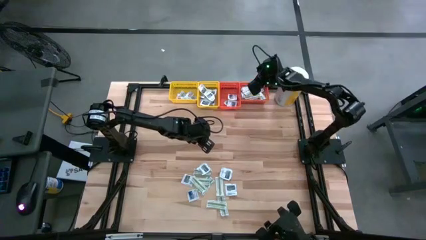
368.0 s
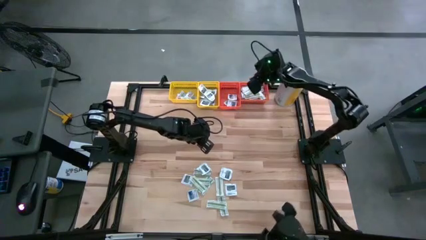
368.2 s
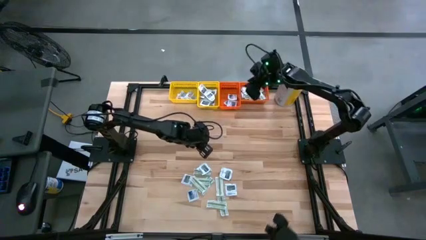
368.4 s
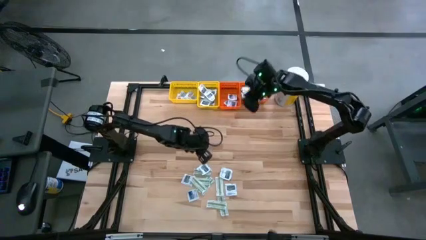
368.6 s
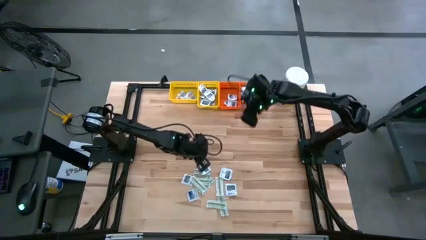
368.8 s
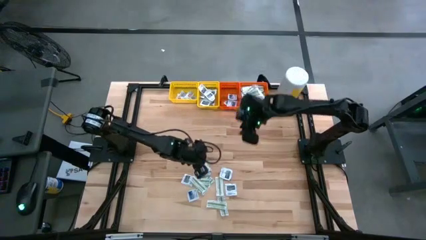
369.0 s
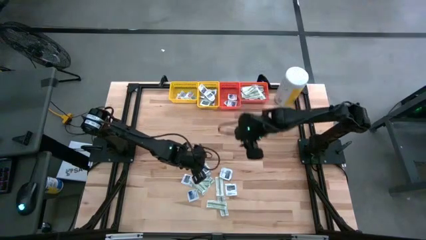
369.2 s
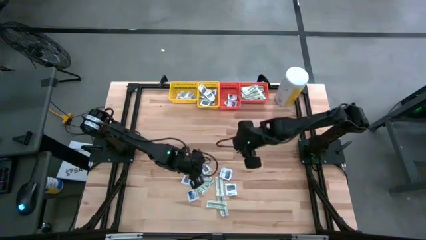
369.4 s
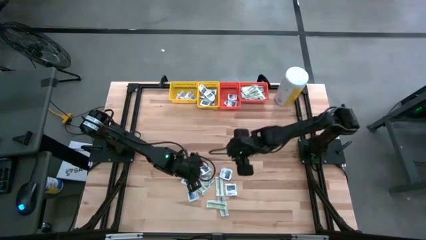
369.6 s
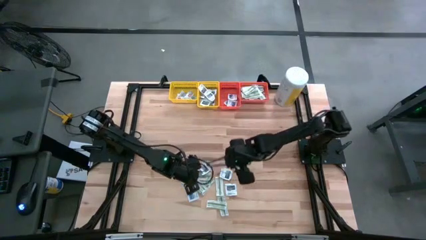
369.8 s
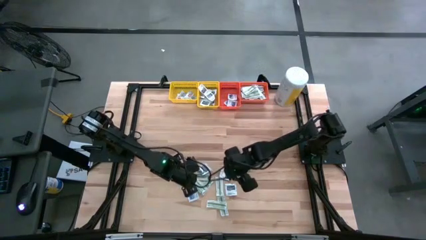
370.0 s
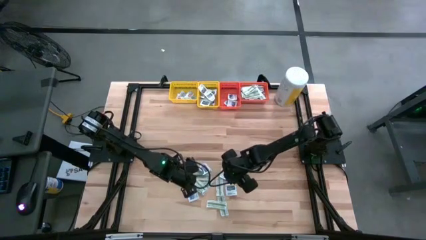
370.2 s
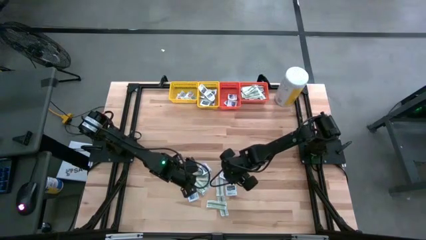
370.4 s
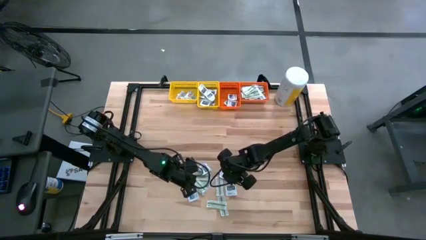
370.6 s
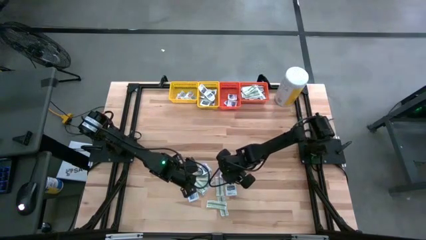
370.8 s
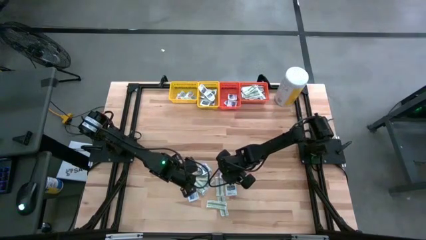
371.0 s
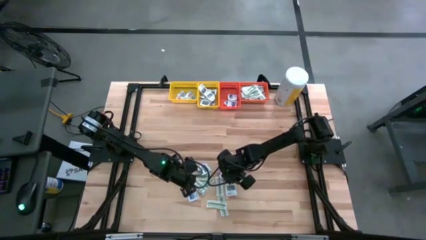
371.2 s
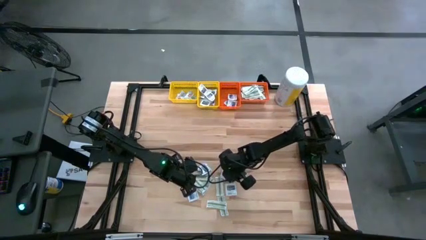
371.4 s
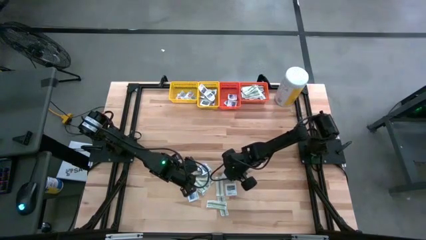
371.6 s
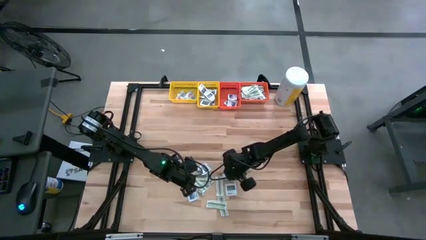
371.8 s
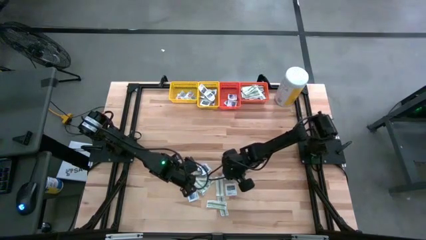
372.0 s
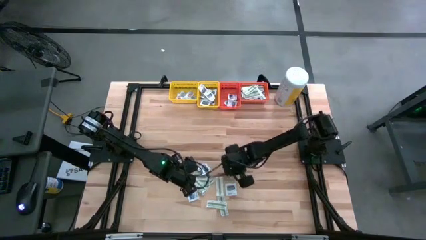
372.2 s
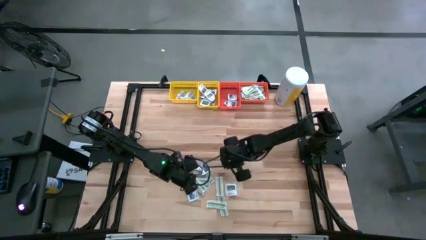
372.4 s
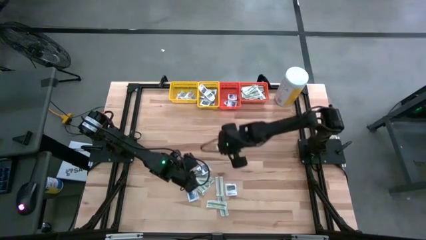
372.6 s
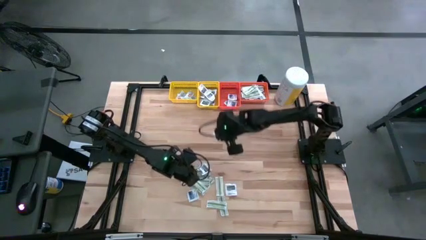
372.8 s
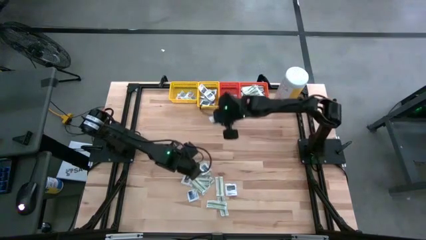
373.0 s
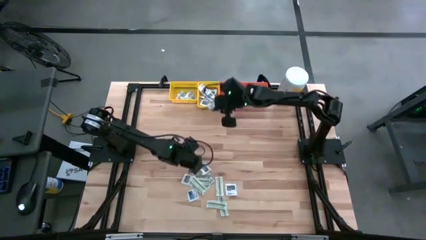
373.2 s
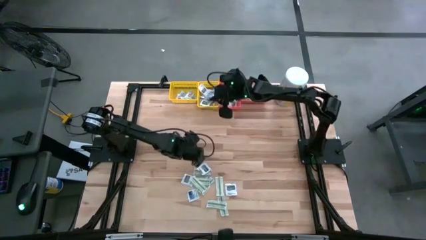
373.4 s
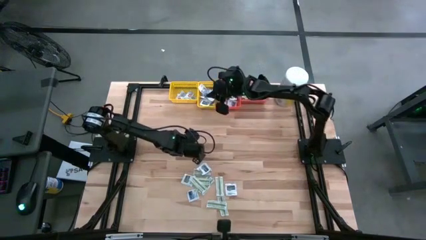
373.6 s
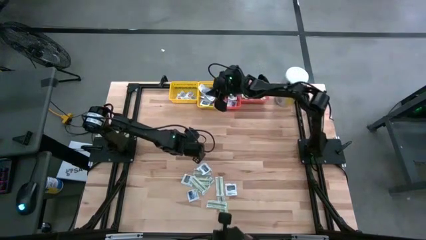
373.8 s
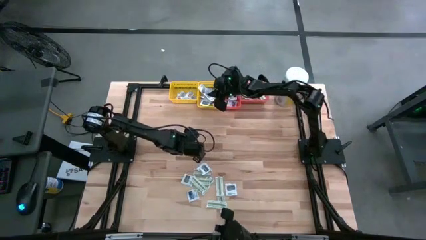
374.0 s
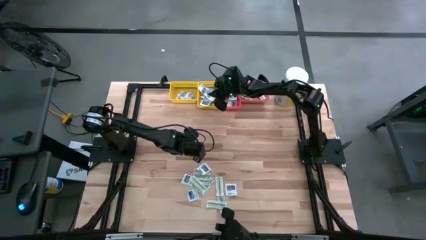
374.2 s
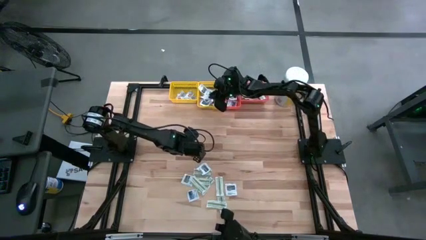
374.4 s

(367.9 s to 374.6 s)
Task: Pick & Place First Aid Supplies
Put the gray packet into the right yellow bin

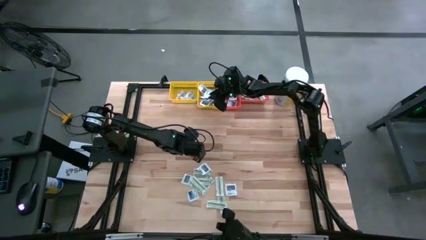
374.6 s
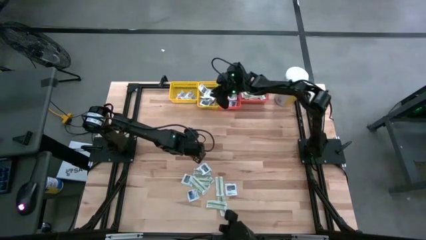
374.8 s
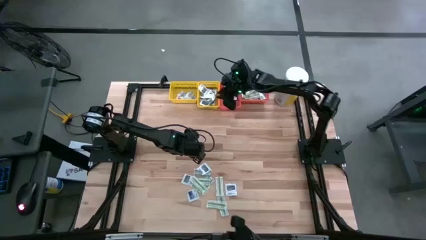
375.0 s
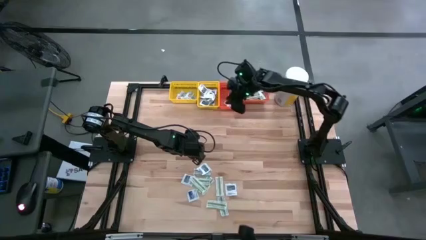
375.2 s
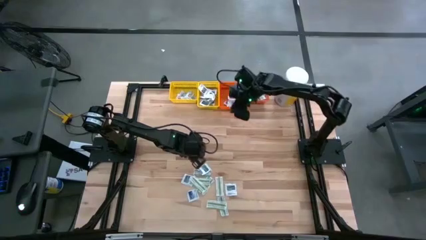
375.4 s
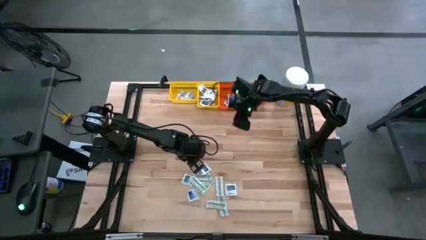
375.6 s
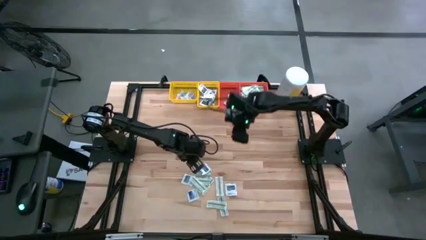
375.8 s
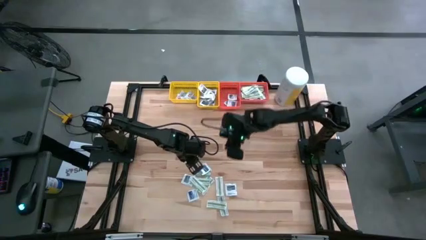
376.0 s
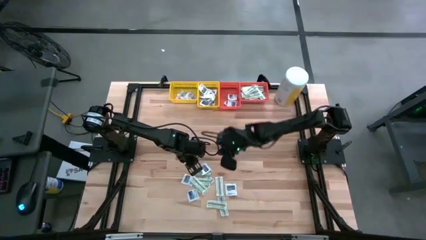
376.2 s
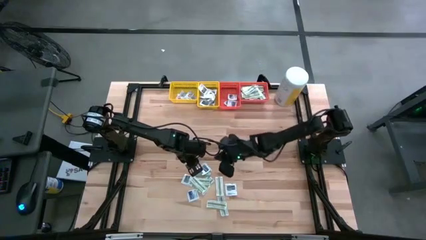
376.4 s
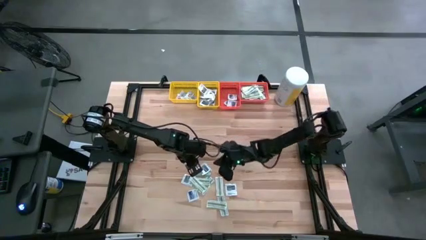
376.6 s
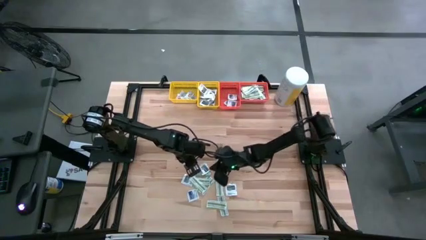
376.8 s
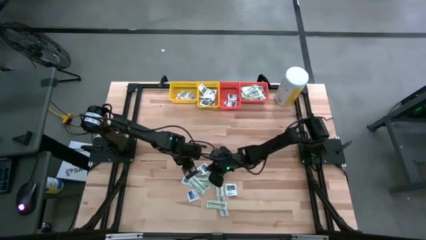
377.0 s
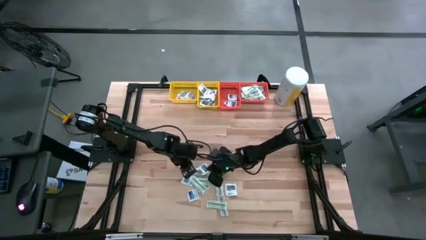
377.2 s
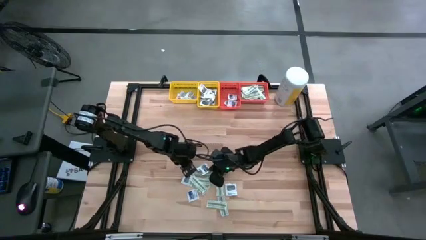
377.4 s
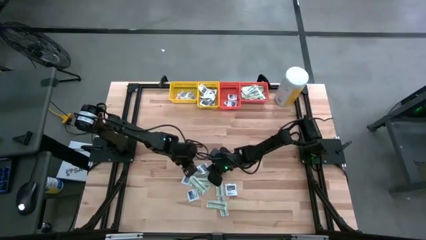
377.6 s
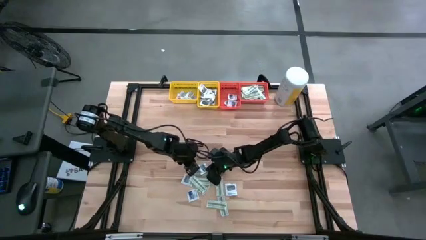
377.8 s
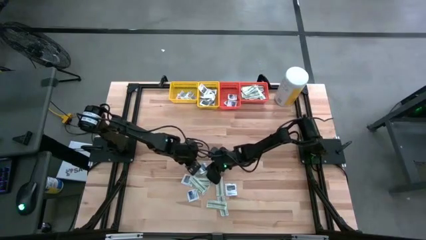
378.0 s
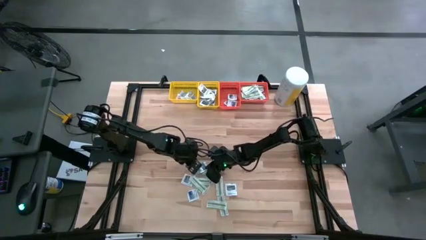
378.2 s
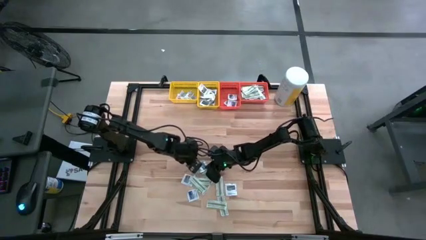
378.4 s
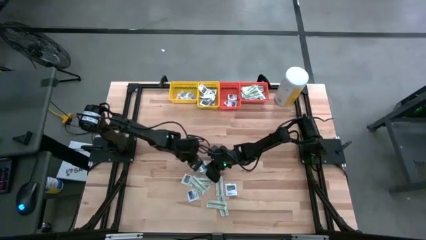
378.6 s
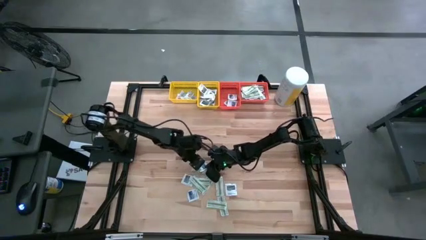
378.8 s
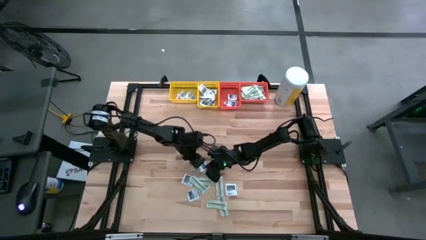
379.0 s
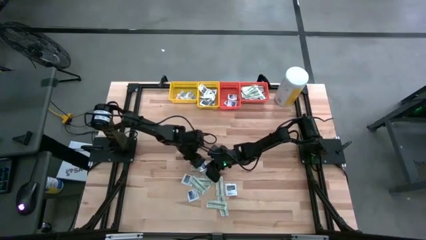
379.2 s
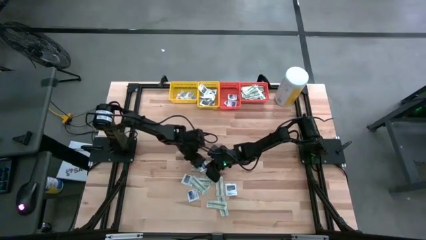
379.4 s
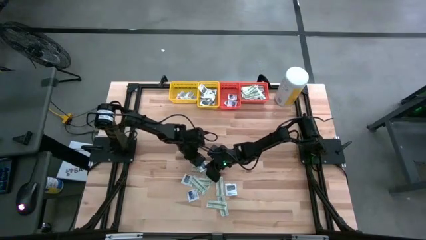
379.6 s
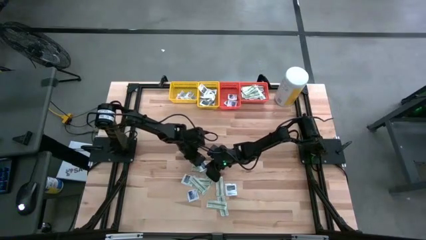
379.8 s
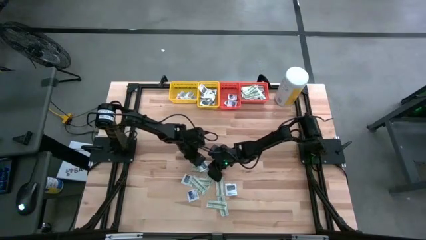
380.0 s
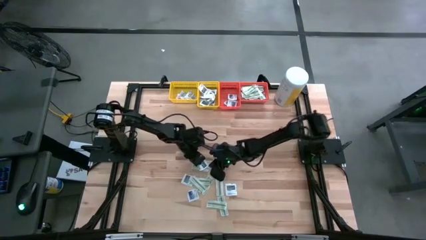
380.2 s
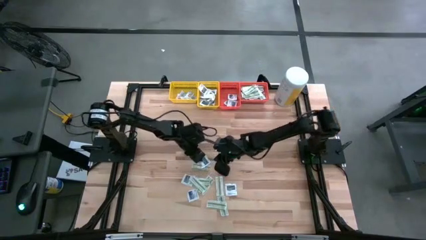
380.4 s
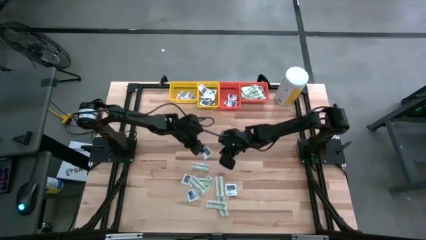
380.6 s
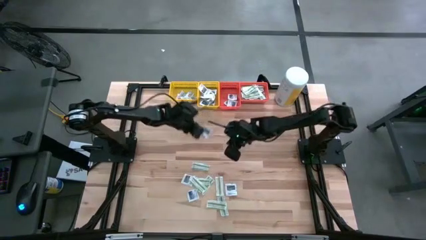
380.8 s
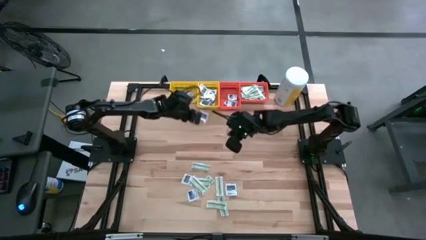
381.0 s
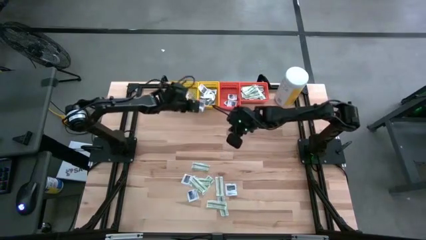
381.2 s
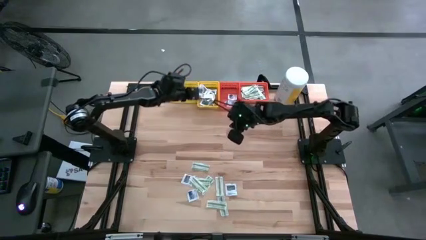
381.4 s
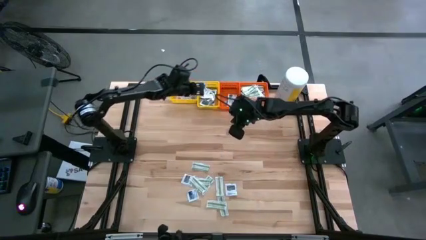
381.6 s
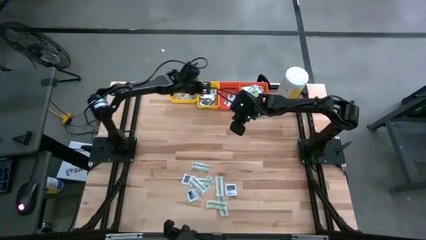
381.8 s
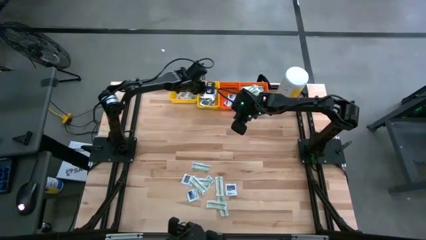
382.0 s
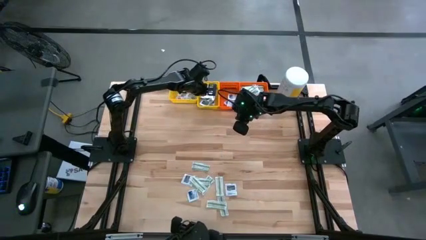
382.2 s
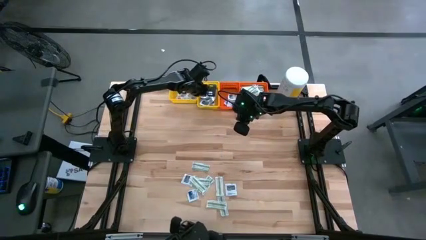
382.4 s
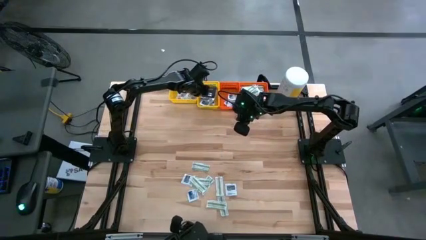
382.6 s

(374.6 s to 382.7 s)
Put the gray packet into the right yellow bin
